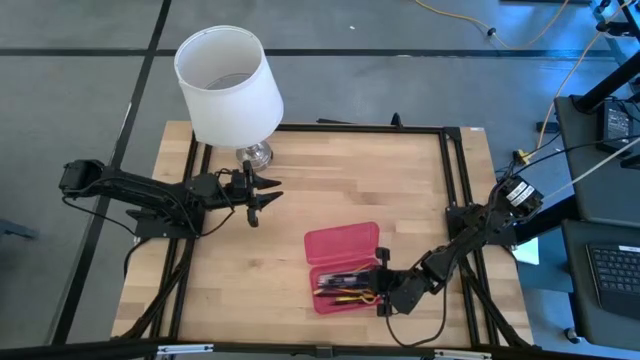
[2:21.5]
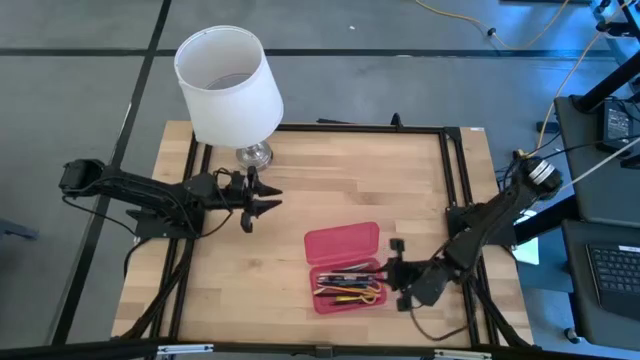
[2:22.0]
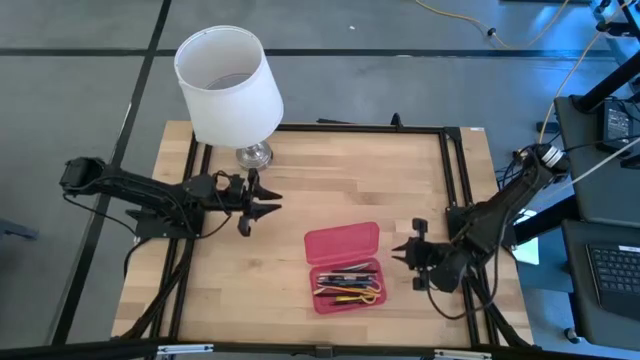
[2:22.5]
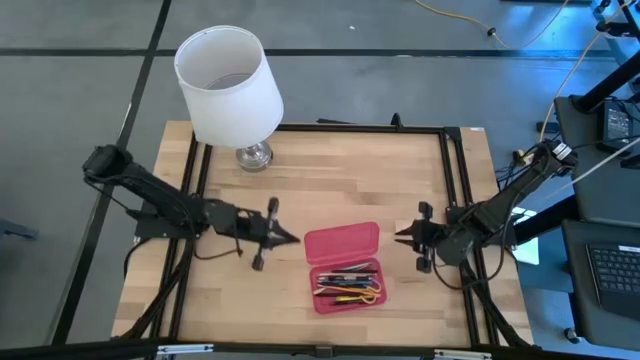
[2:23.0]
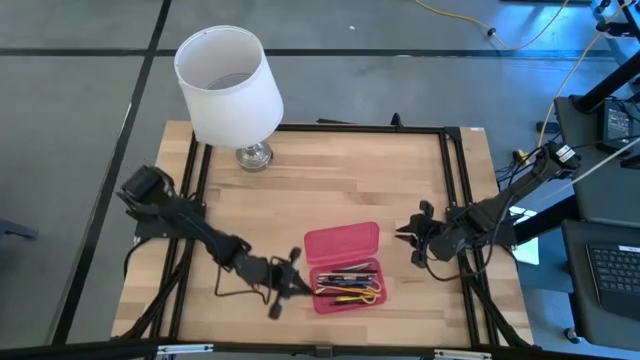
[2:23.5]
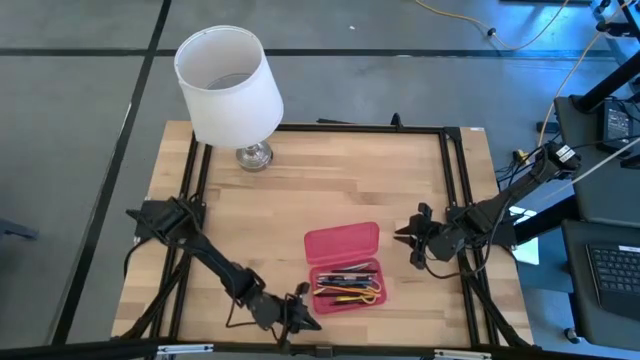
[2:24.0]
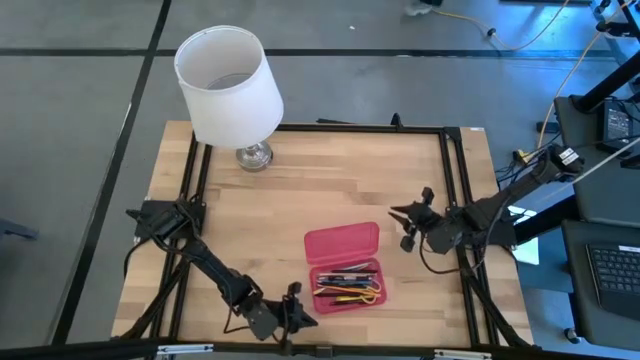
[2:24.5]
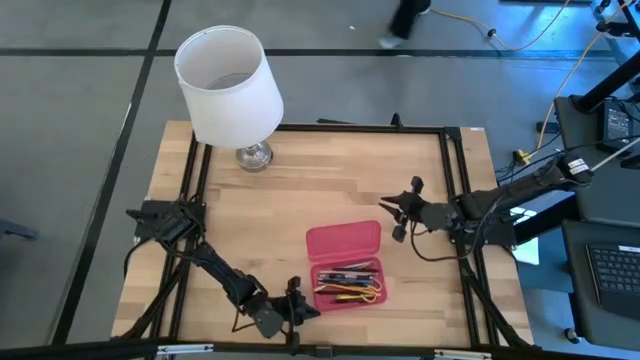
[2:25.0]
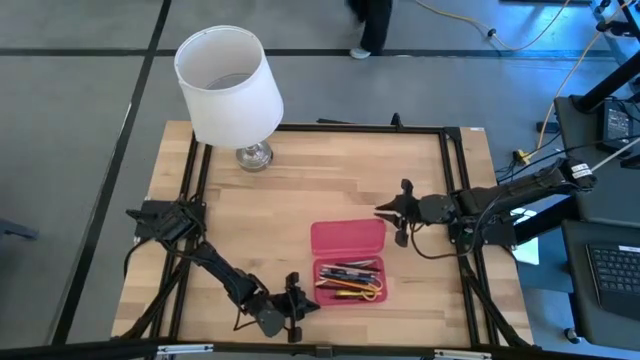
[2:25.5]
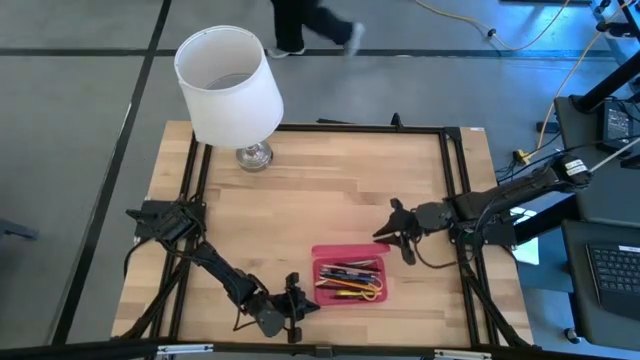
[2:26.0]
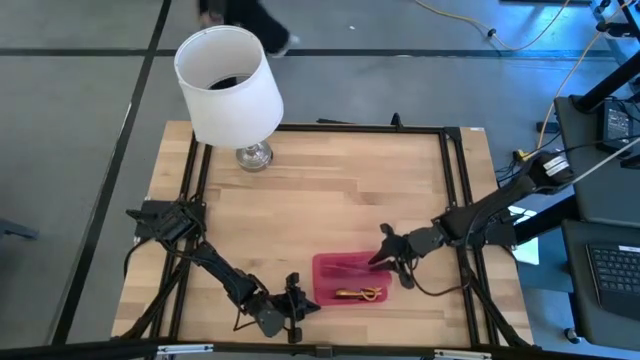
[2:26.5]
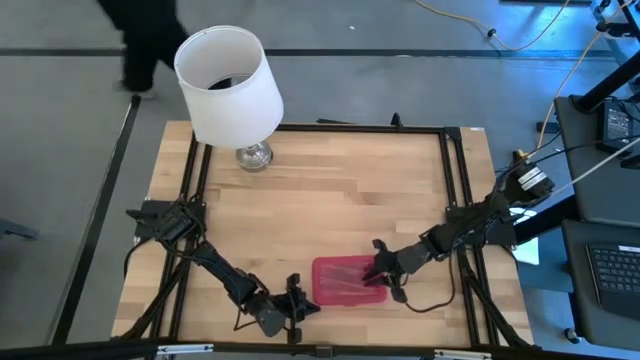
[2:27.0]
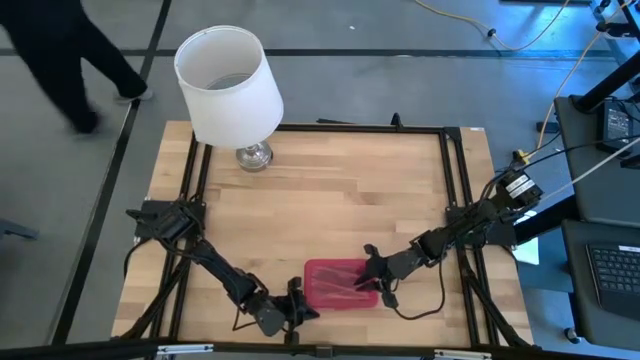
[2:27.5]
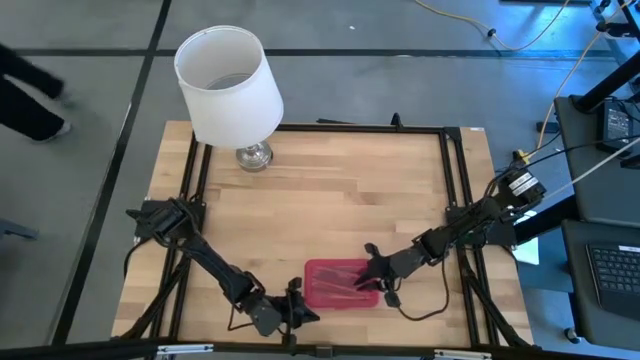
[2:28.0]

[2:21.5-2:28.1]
Task: Pick & place school supplies into a supply box
Close the pink supply box

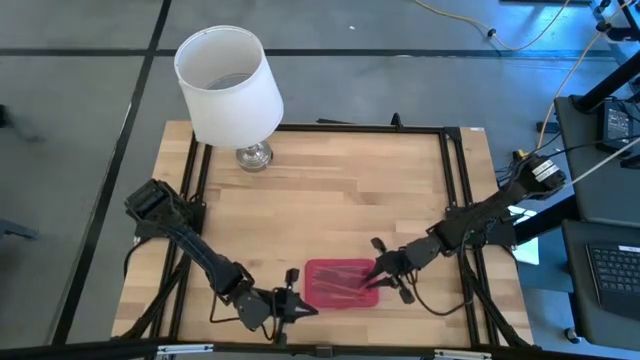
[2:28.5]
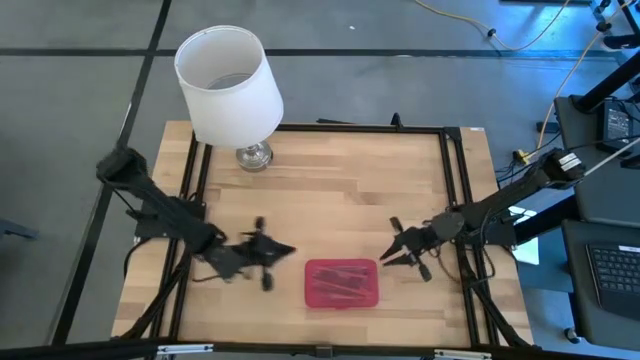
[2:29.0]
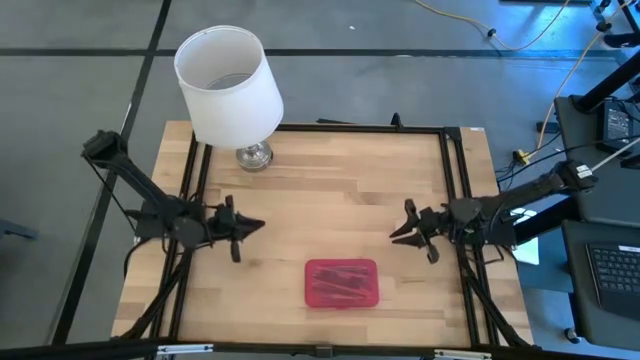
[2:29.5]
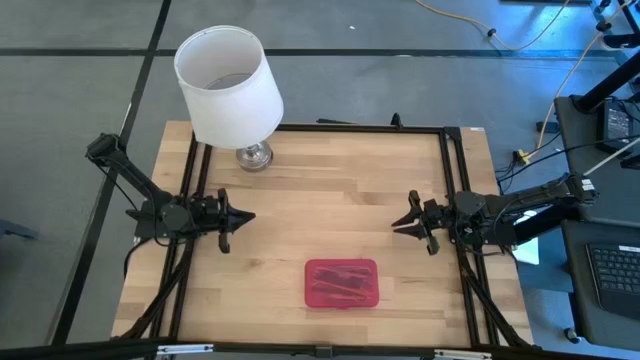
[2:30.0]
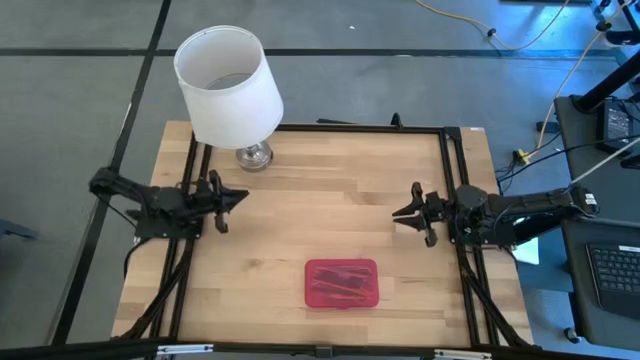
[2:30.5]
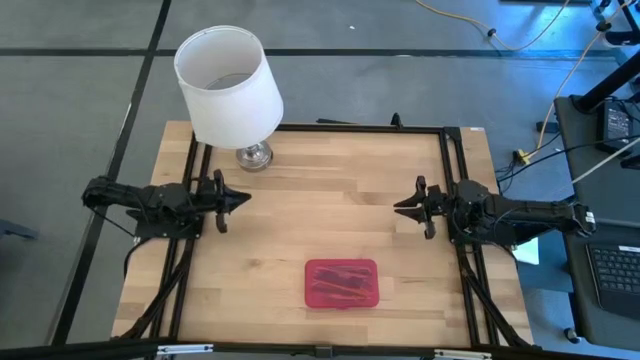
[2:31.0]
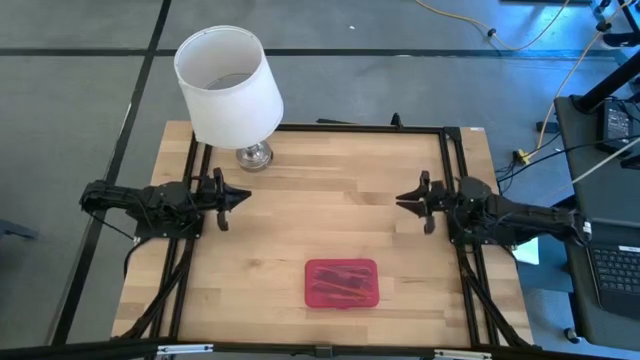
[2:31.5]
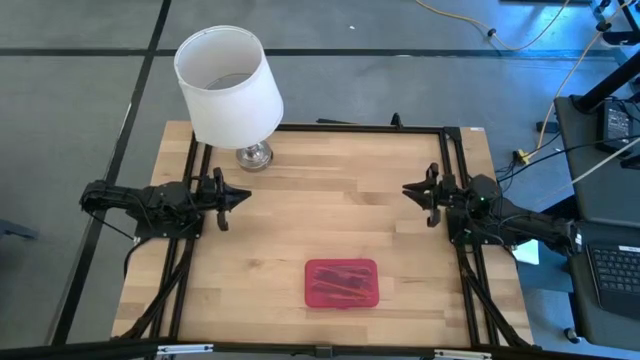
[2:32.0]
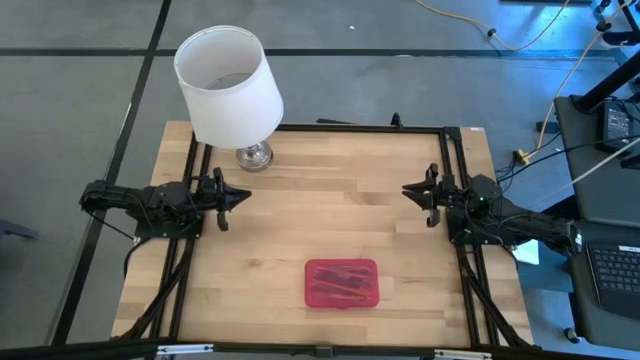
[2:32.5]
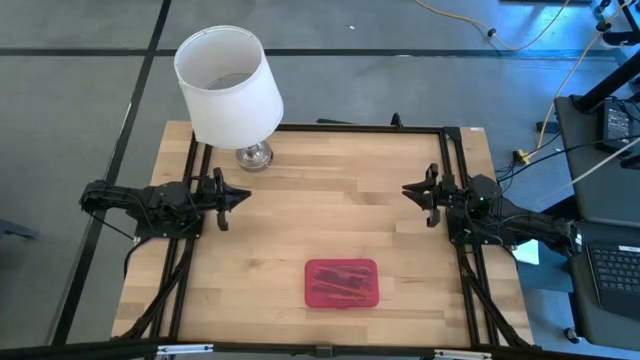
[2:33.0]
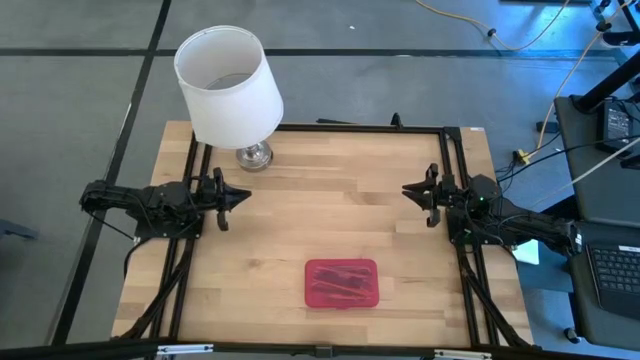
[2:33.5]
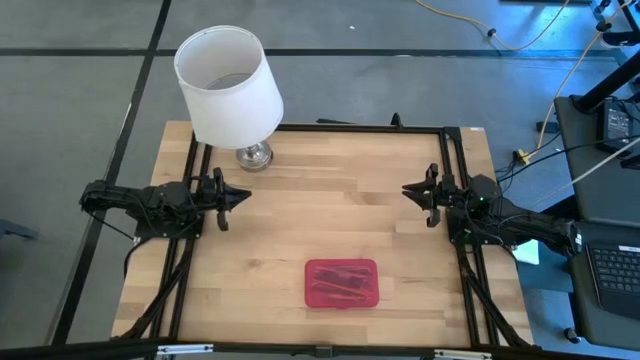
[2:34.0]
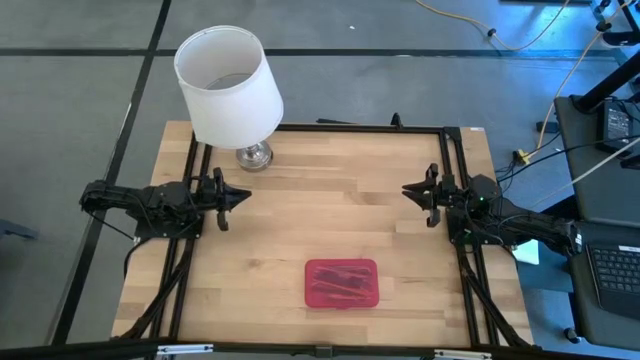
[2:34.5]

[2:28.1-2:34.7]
Return to Home Position
